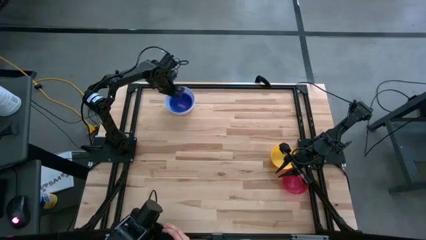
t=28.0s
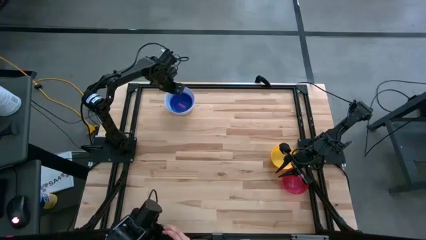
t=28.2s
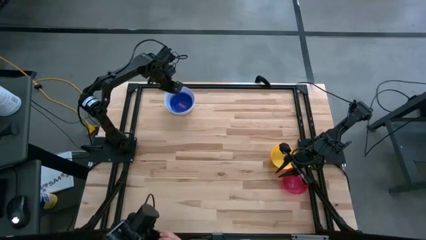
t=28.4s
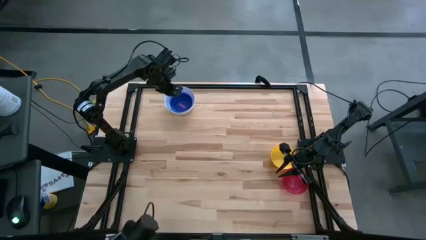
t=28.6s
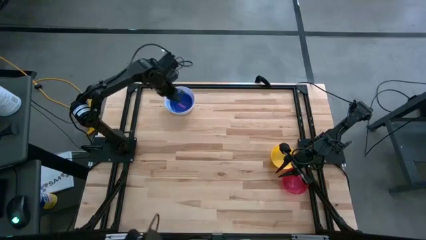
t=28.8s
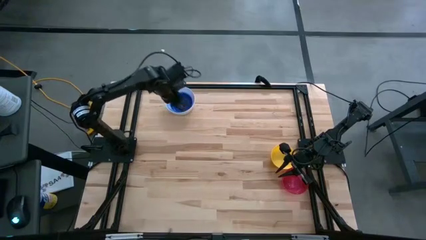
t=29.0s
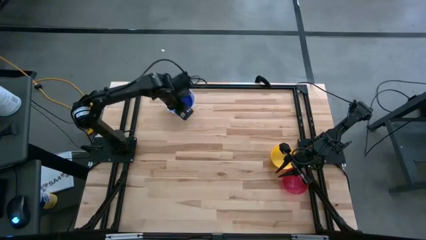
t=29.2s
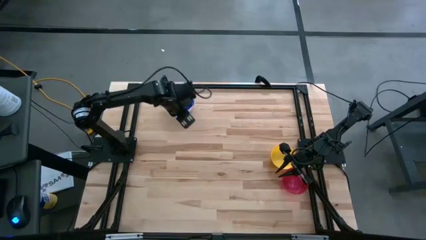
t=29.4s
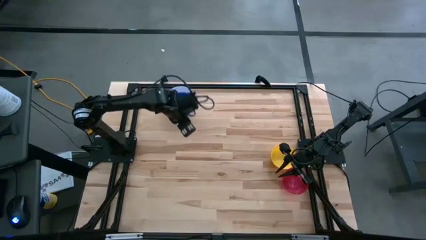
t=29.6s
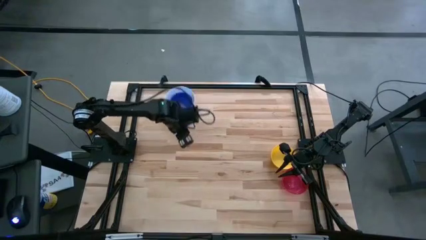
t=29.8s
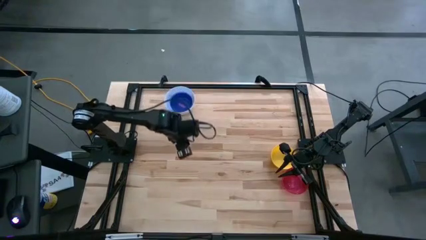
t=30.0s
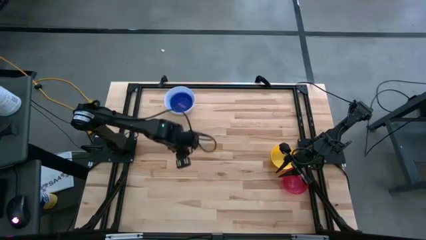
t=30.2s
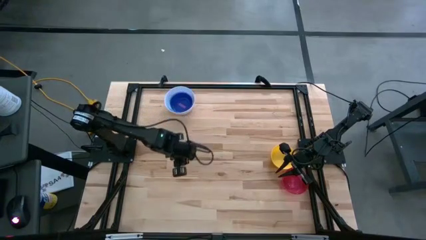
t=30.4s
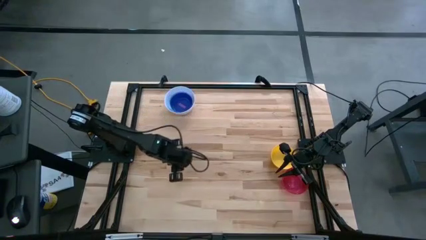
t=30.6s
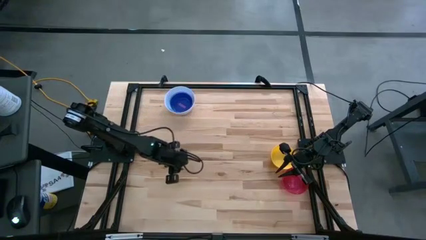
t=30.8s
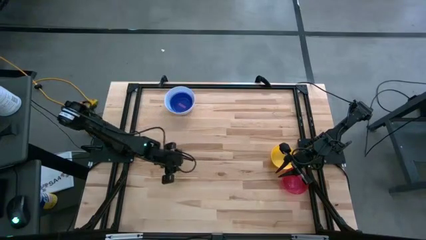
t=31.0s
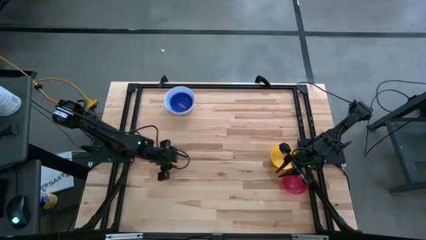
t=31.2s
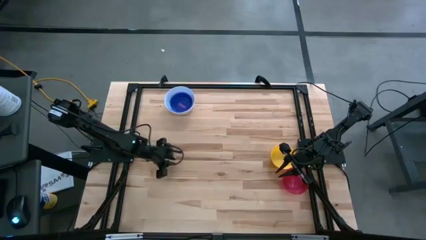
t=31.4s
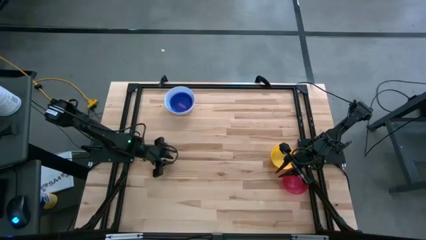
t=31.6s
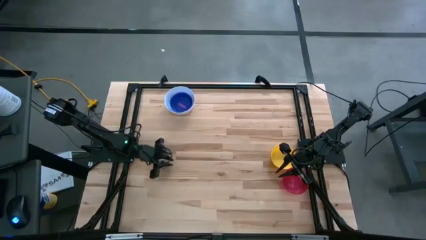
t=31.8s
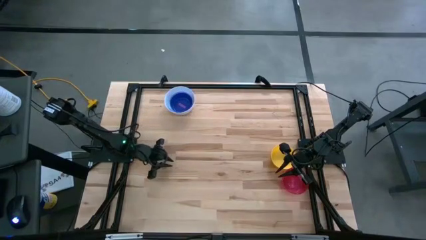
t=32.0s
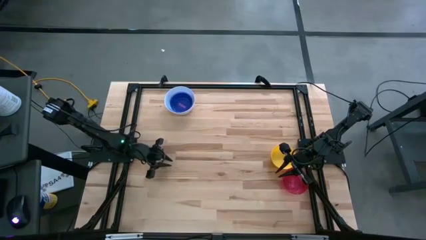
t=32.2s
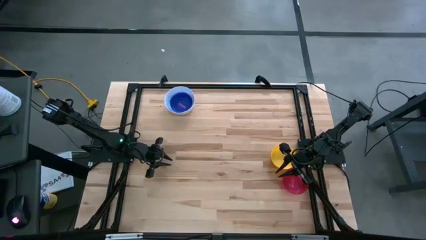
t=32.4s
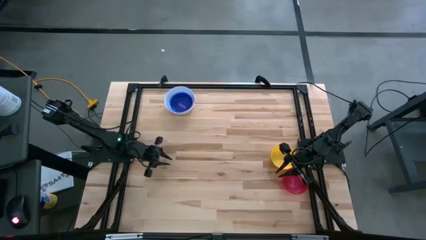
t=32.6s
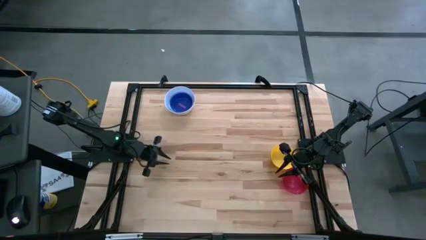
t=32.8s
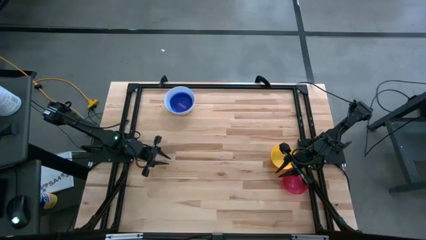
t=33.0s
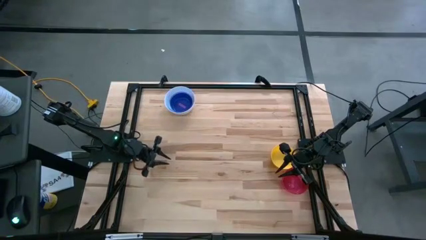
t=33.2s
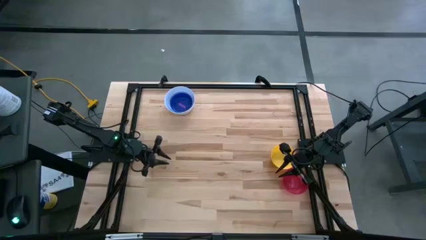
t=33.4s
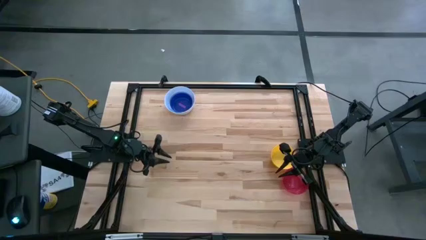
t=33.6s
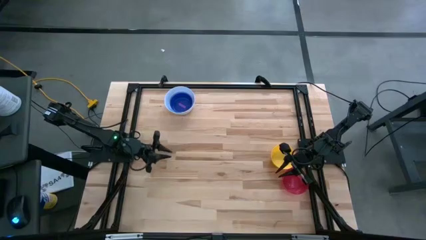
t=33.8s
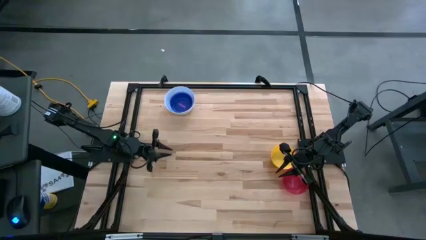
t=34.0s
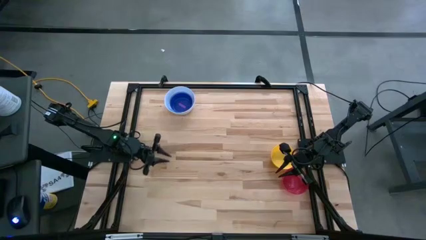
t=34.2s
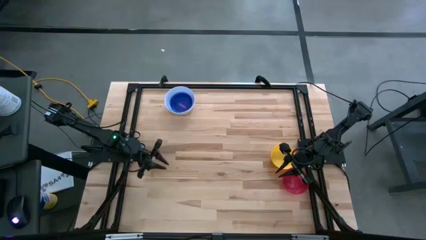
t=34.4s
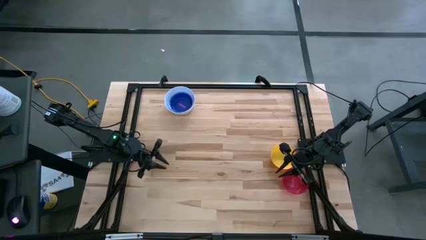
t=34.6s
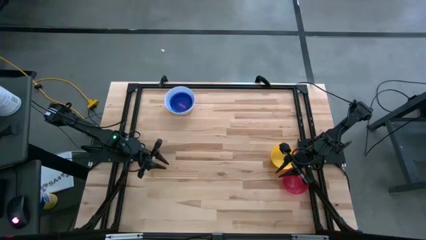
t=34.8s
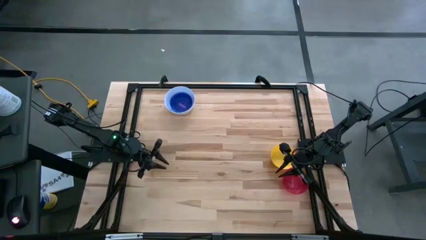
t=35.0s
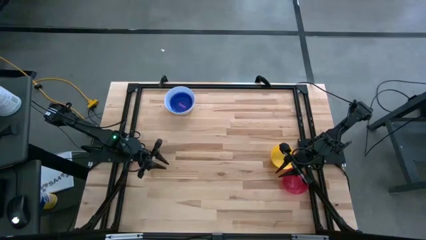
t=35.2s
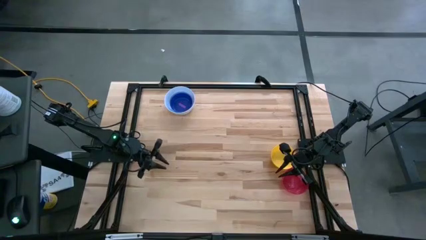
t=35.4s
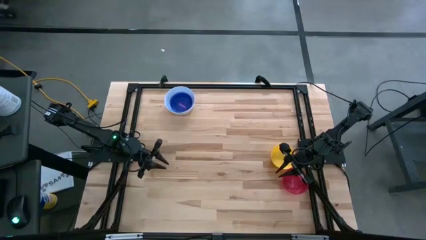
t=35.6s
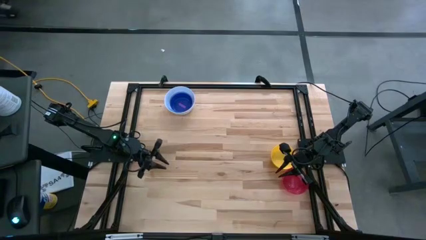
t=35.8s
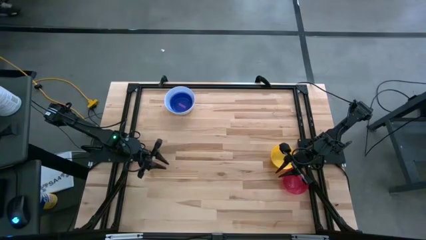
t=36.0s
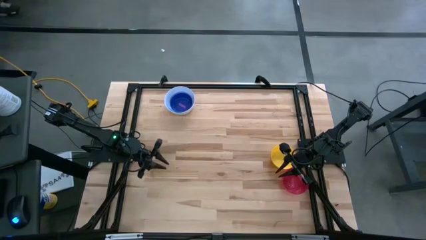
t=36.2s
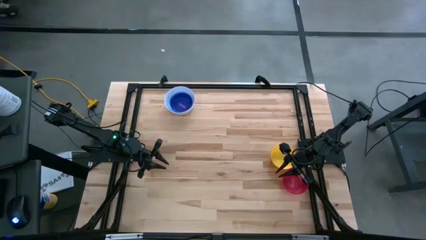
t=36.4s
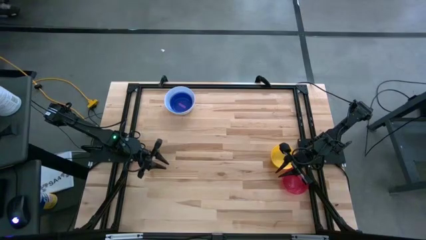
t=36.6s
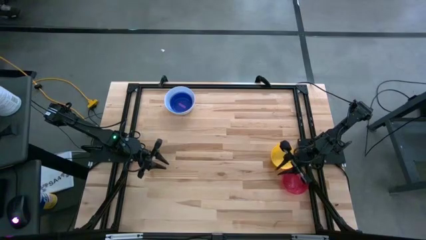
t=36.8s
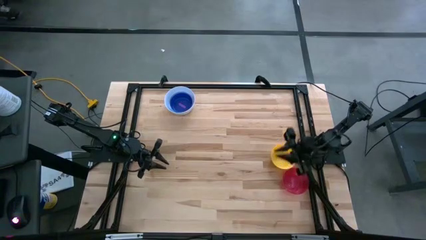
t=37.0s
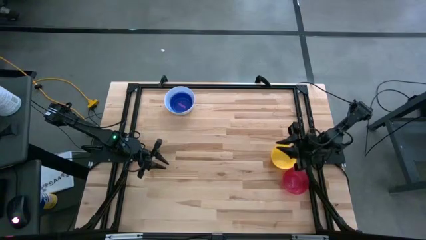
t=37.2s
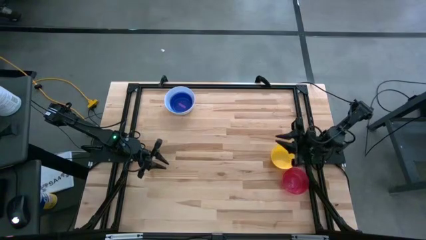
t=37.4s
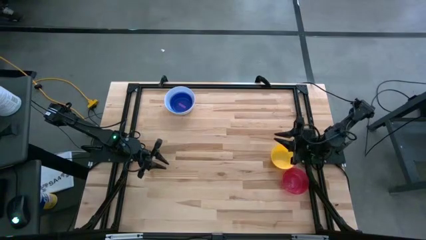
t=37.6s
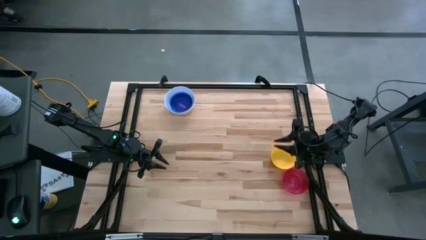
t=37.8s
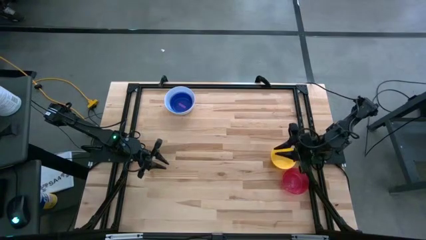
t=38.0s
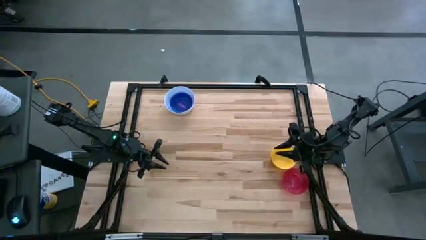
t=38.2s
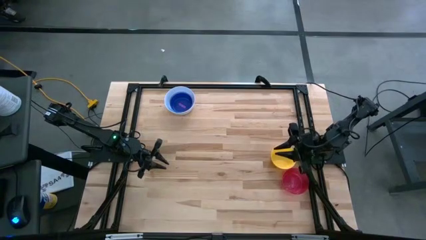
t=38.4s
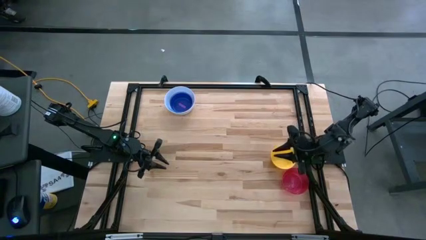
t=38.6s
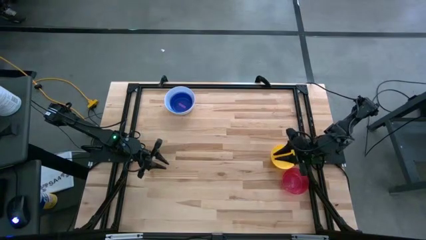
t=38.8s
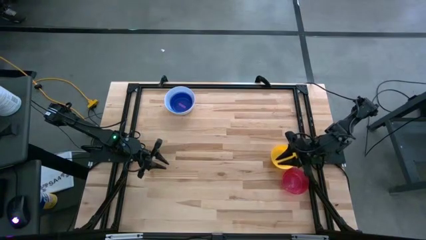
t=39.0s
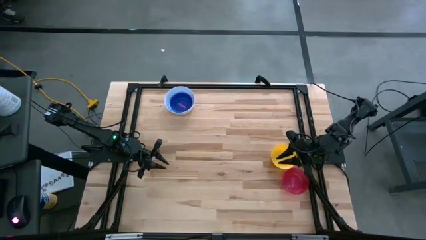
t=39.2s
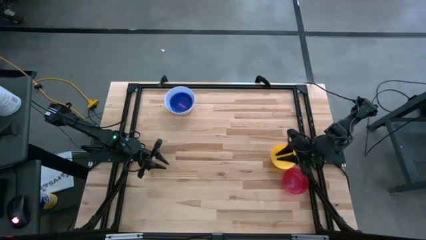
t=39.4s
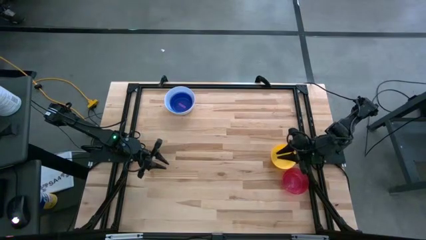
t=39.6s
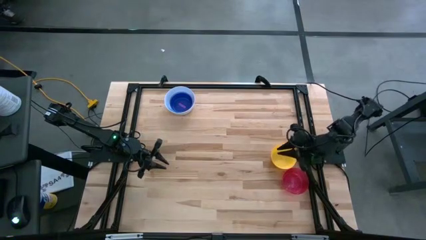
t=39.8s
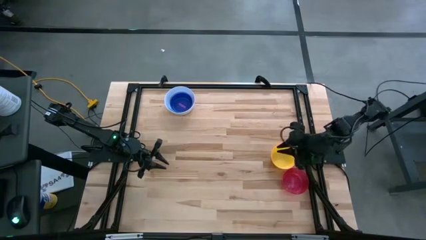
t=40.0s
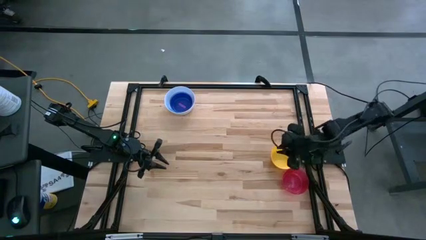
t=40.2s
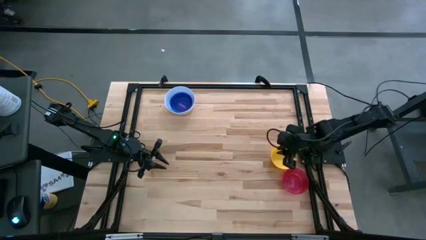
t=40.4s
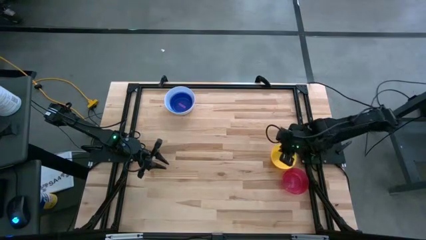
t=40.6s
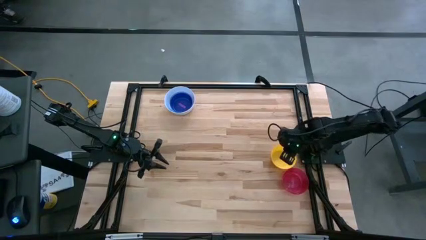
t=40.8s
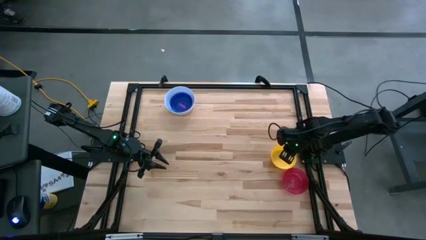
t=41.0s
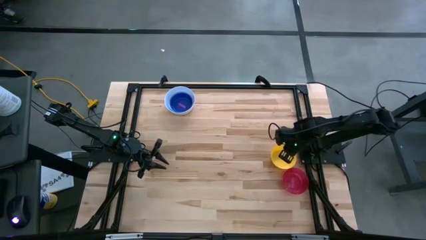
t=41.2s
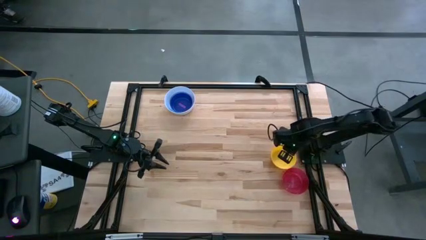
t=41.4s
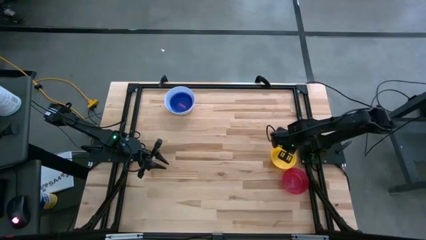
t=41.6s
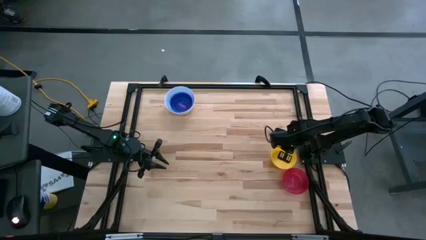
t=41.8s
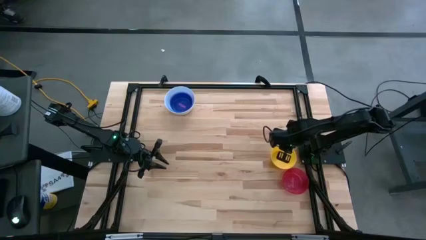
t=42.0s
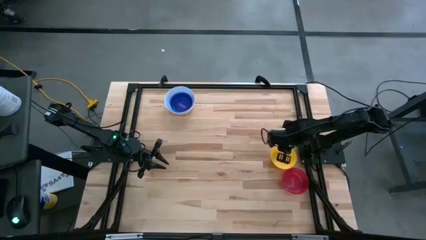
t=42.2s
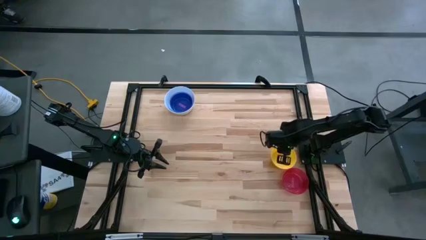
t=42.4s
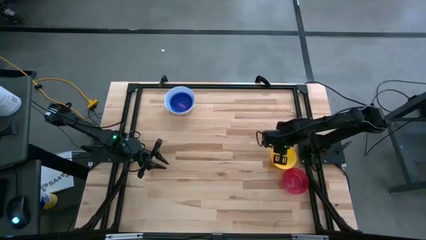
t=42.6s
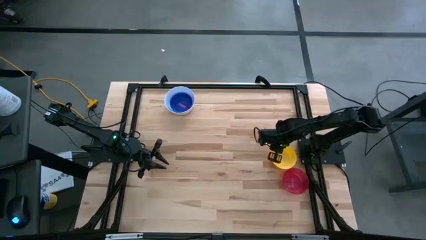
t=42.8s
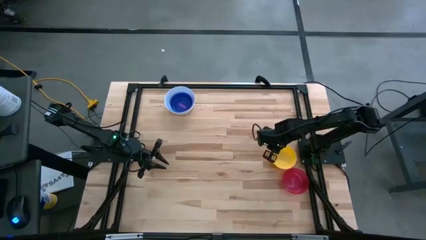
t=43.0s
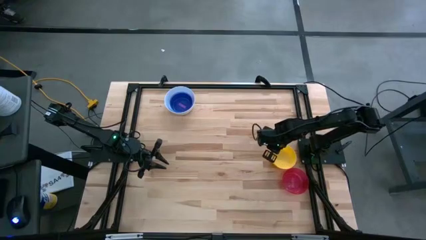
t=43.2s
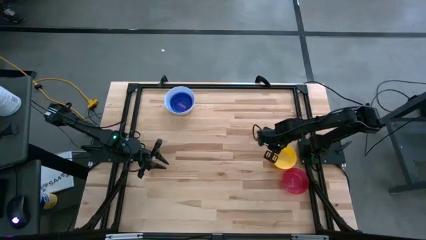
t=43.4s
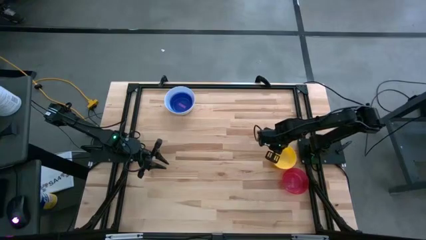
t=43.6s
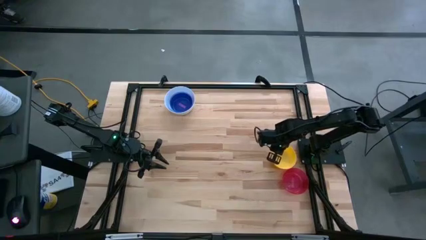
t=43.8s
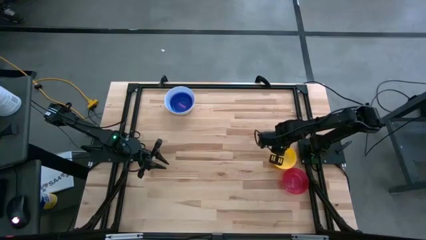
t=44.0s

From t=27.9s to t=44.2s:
Stack the yellow bowl on top of the violet bowl
